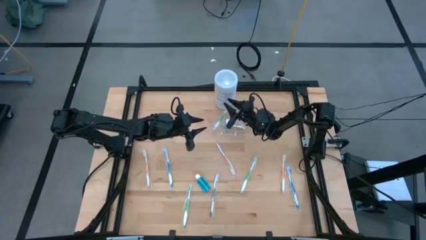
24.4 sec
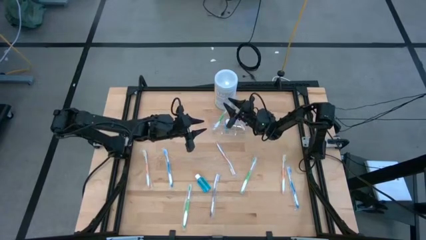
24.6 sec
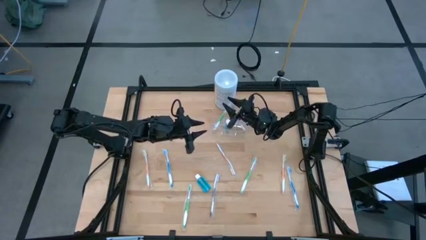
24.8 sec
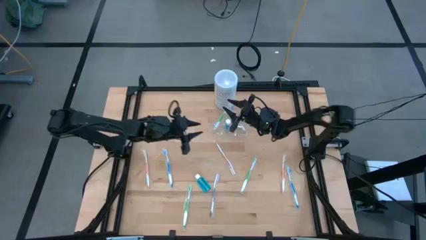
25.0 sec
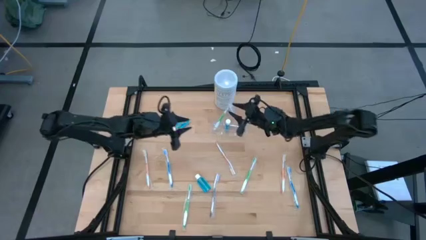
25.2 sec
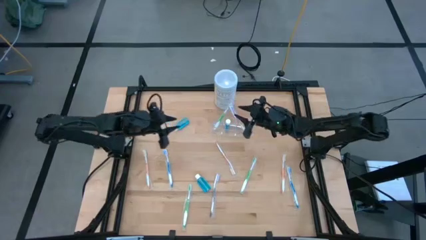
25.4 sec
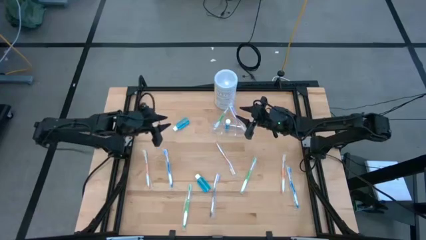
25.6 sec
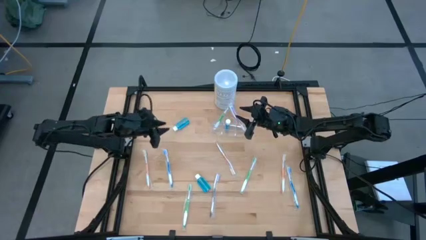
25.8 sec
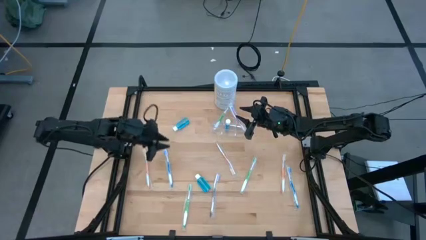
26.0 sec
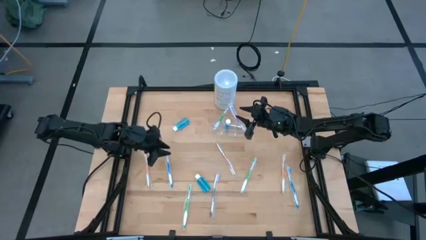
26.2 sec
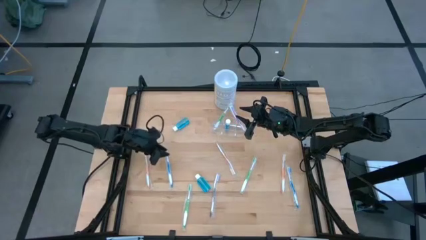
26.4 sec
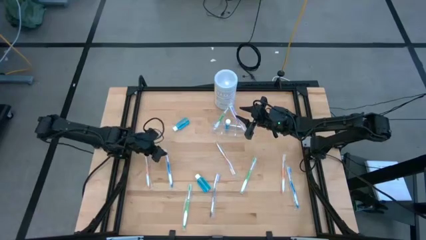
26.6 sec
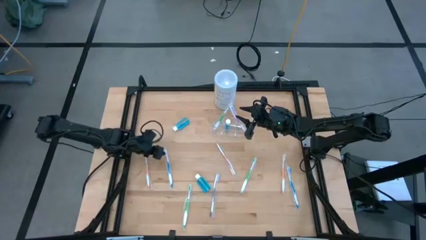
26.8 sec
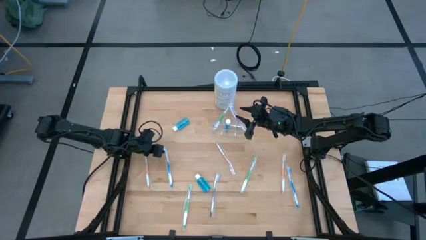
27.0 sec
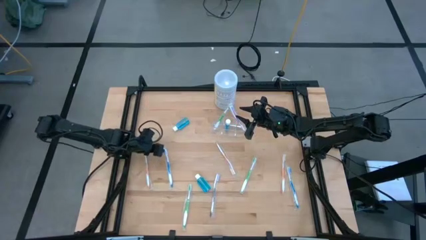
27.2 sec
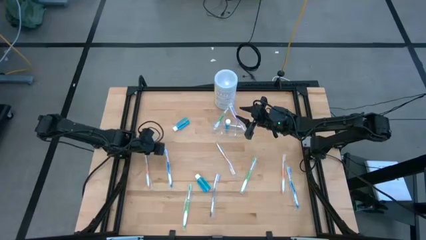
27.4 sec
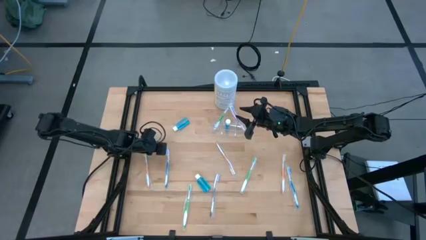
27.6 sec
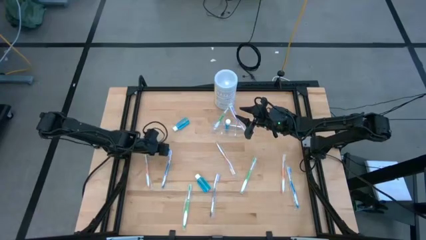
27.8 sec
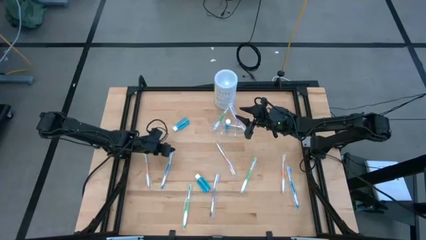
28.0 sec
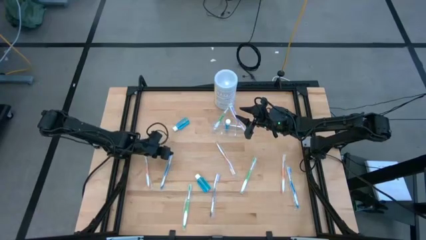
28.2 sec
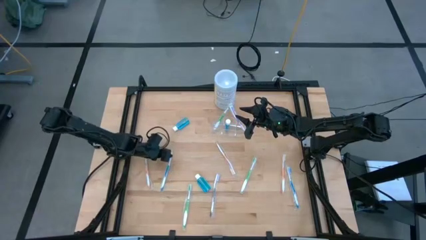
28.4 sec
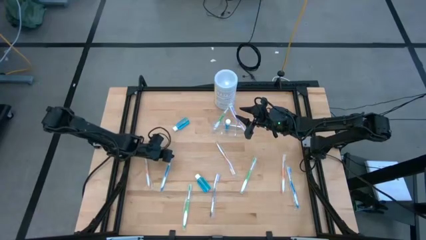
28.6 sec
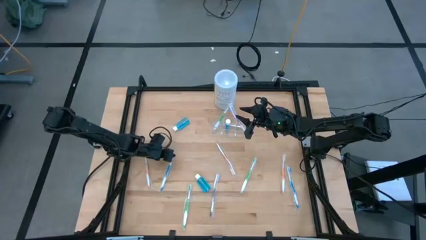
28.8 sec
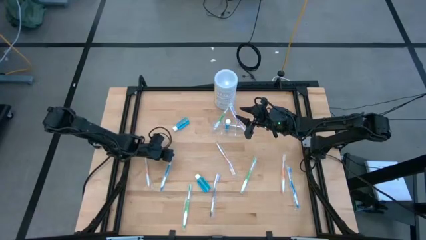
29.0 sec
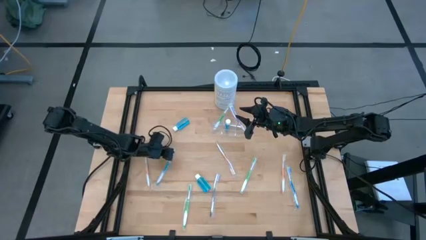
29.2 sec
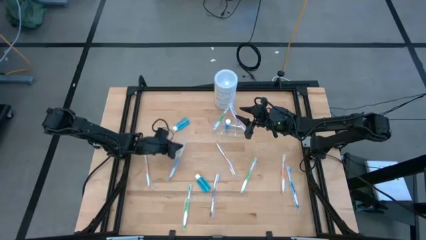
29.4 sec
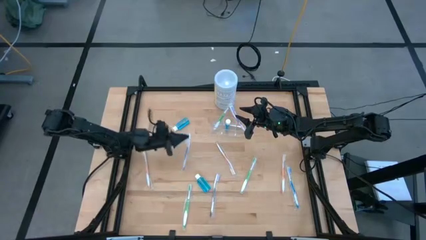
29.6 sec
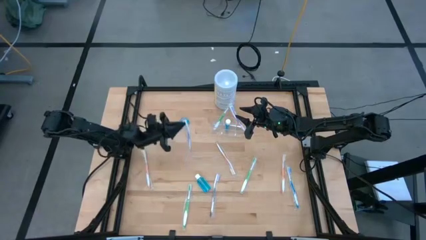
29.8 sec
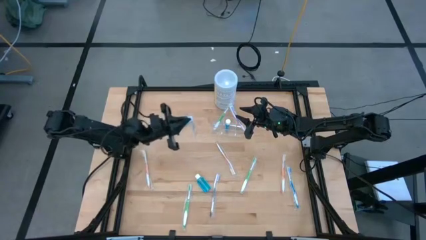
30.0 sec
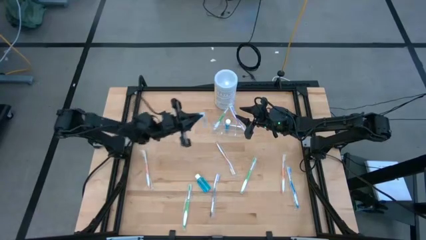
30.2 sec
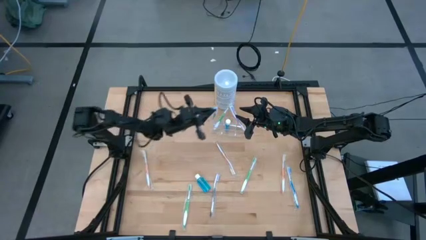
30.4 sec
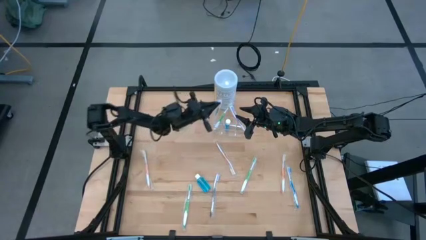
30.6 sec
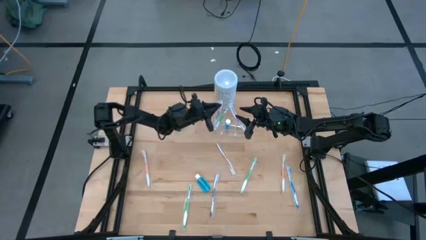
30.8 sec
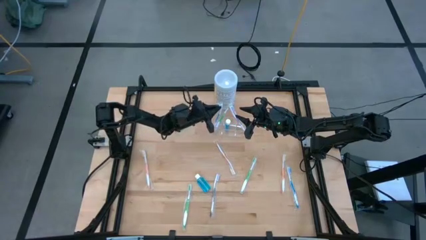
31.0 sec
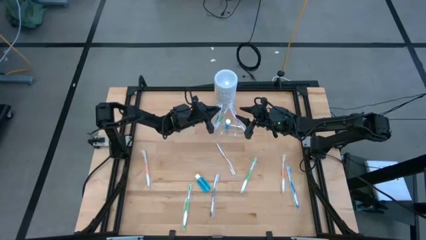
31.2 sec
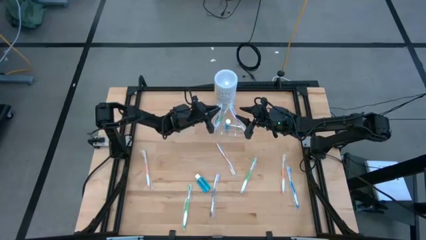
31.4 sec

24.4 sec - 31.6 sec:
Task: Pick & Place toothbrushing station
Put the left blue toothbrush into the transparent organizer

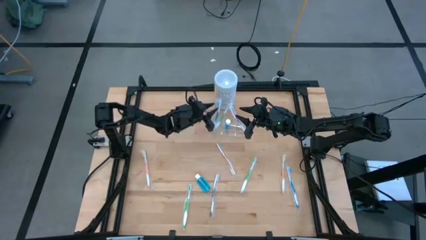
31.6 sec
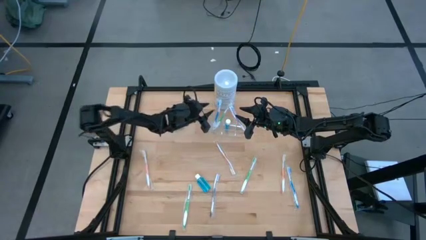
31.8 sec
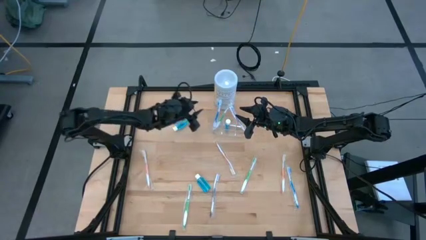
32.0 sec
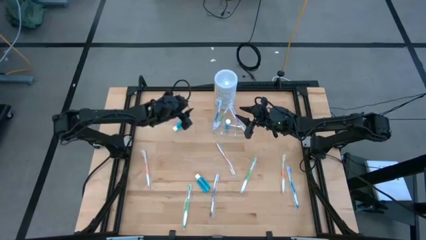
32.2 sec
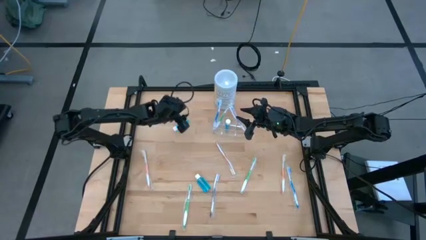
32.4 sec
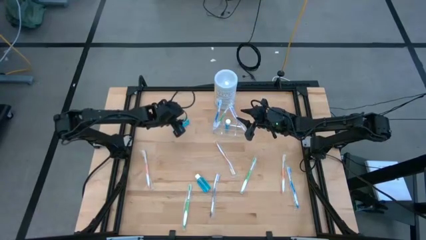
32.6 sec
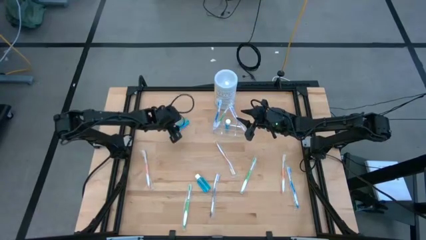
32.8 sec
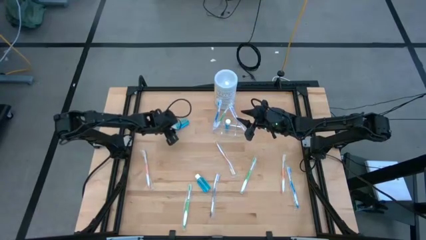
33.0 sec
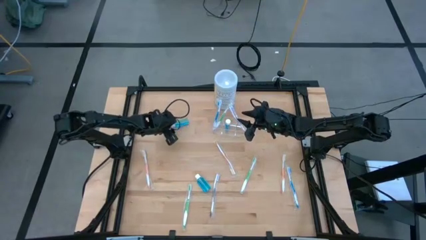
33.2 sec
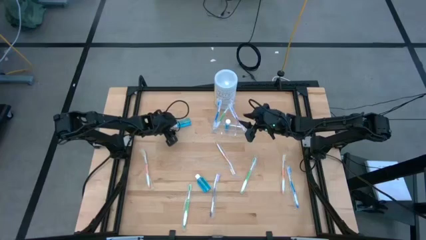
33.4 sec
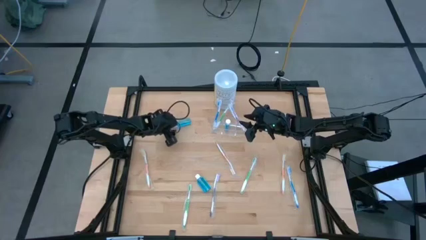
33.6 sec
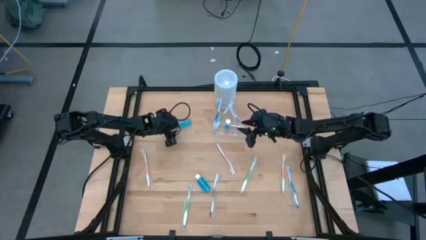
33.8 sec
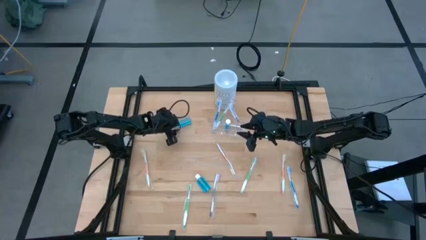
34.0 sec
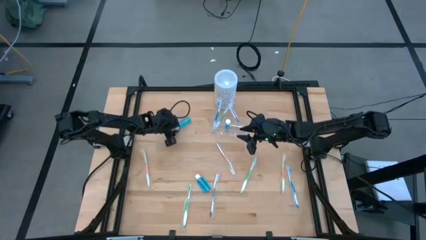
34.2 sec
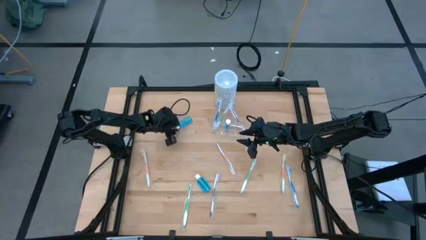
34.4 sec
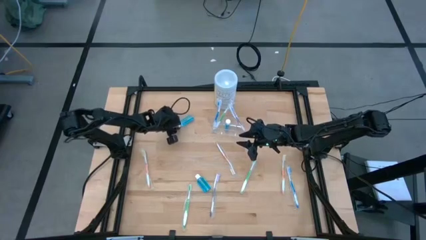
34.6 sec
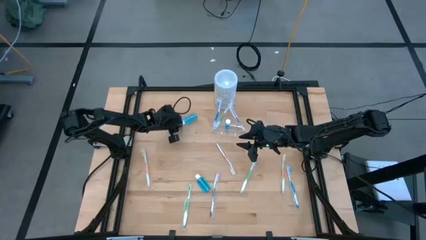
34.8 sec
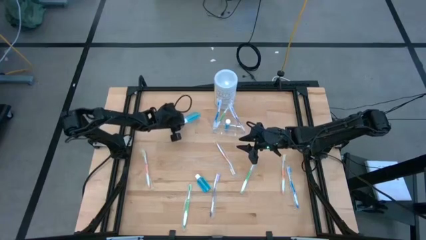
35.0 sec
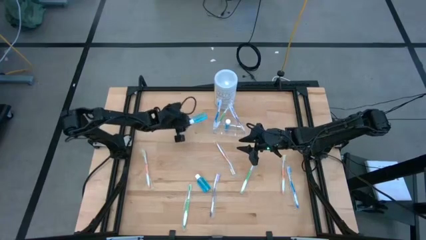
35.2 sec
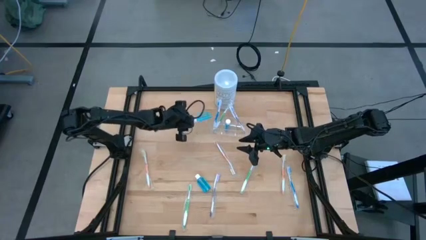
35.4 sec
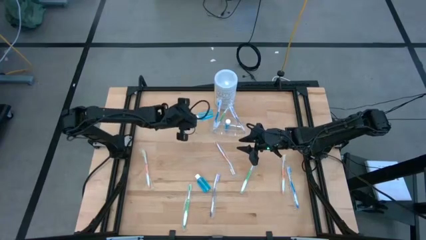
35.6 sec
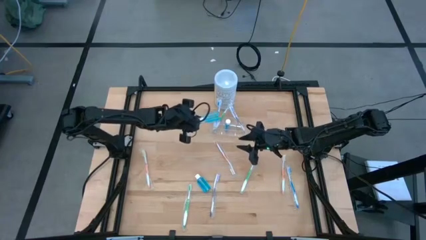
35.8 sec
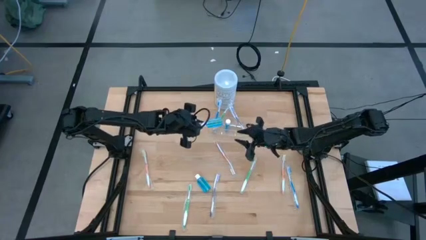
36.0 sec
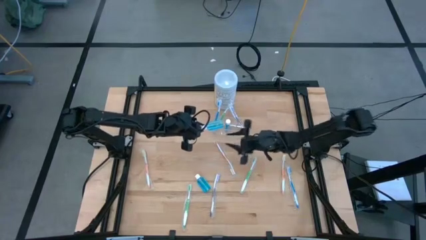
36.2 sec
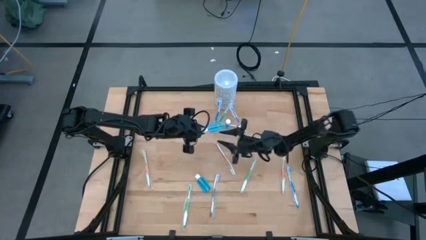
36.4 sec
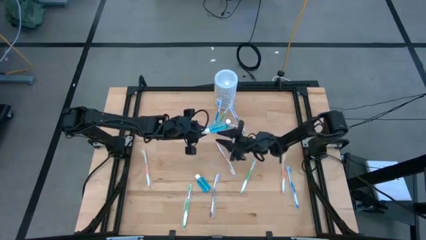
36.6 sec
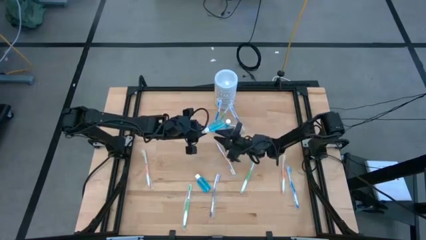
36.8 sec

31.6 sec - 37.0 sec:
Put the top mouthwash into the transparent organizer

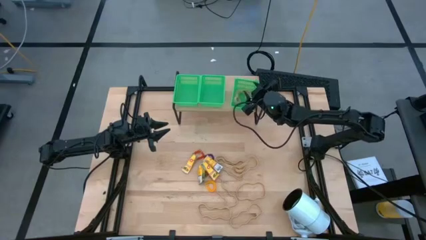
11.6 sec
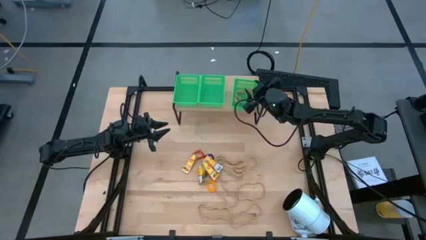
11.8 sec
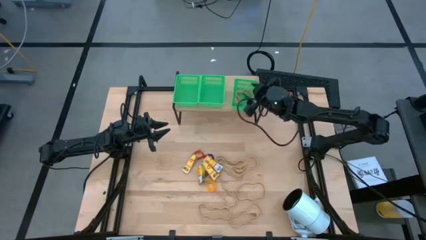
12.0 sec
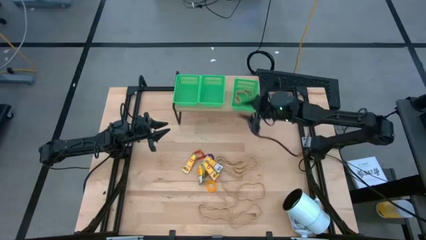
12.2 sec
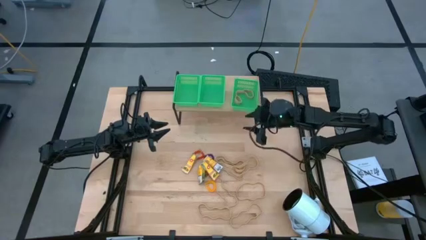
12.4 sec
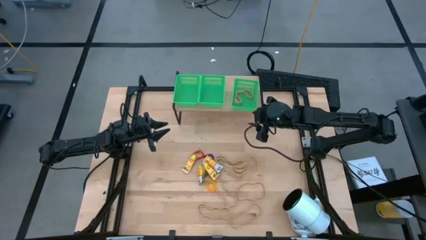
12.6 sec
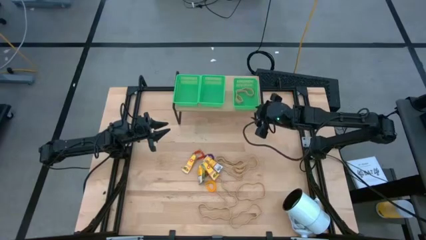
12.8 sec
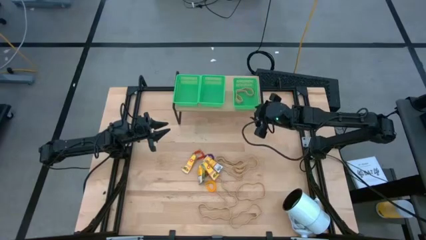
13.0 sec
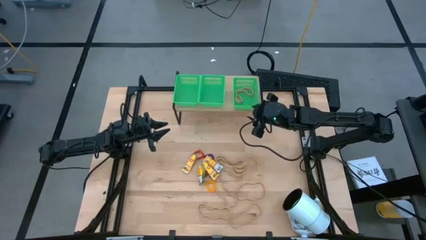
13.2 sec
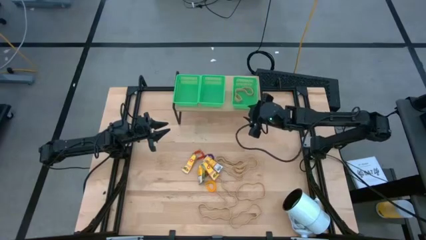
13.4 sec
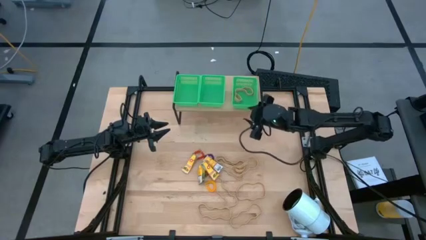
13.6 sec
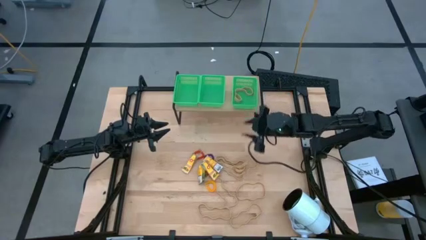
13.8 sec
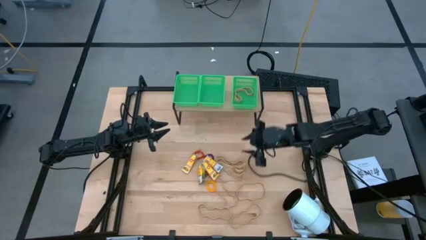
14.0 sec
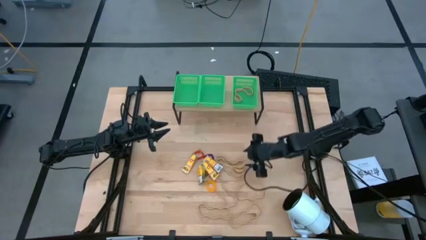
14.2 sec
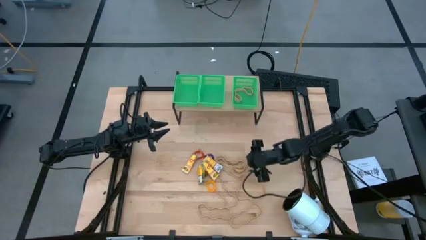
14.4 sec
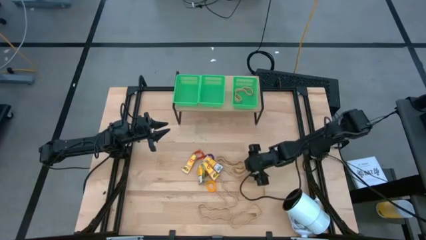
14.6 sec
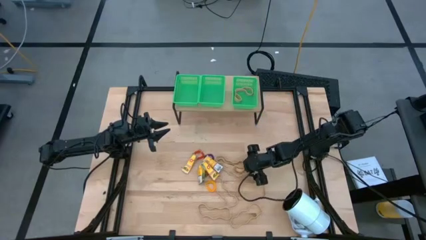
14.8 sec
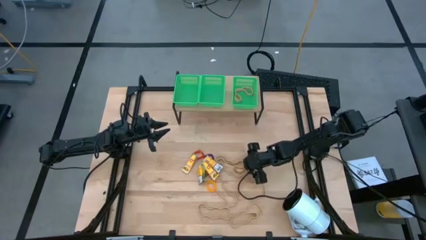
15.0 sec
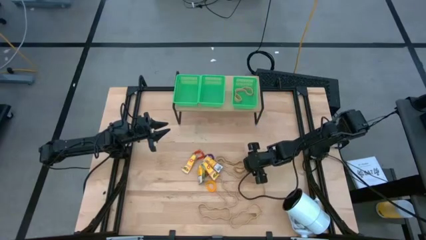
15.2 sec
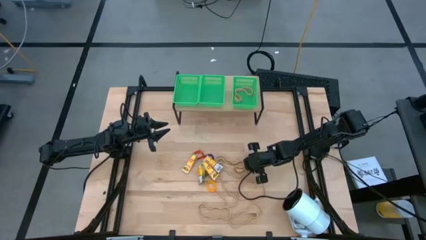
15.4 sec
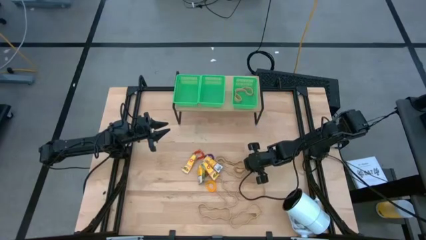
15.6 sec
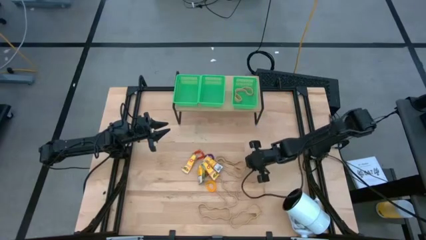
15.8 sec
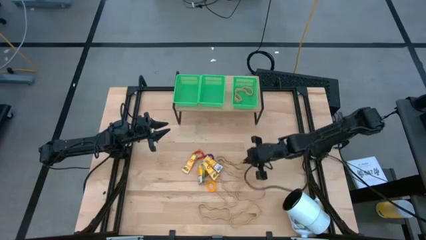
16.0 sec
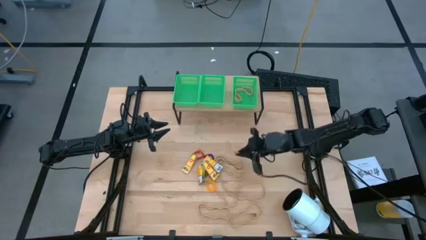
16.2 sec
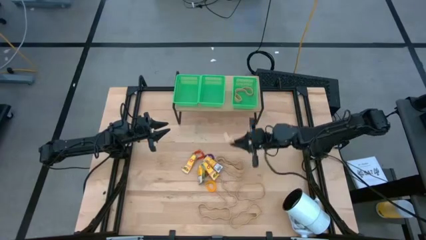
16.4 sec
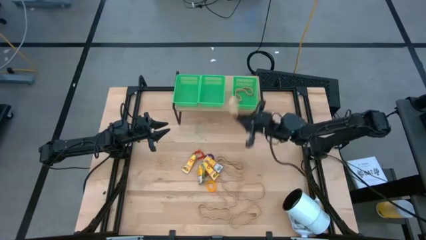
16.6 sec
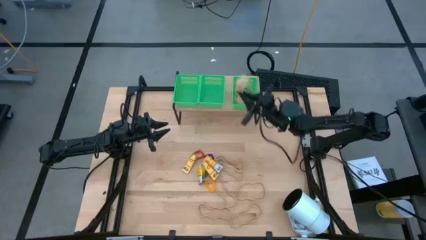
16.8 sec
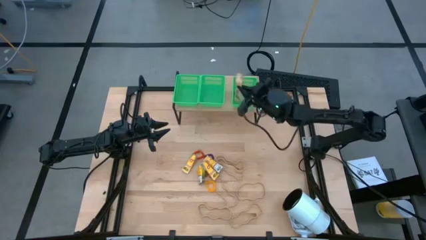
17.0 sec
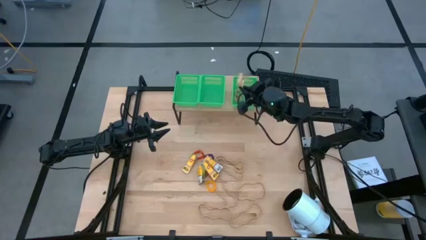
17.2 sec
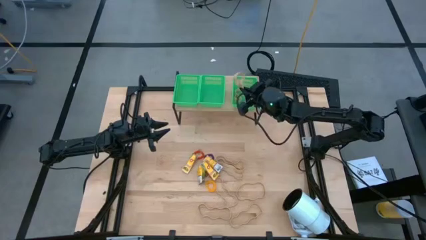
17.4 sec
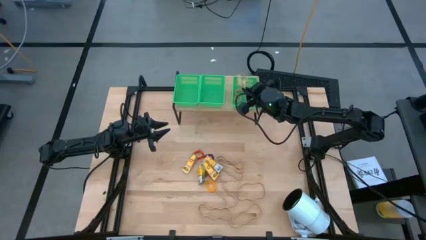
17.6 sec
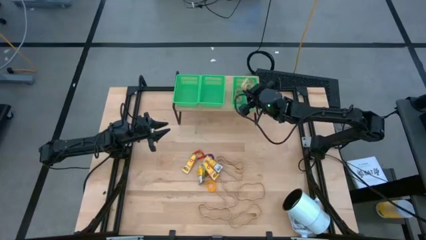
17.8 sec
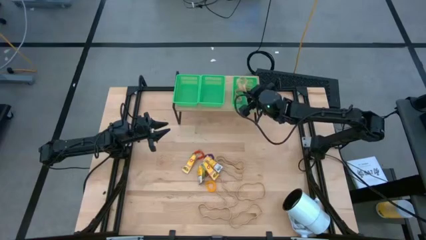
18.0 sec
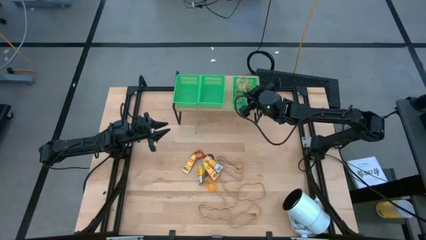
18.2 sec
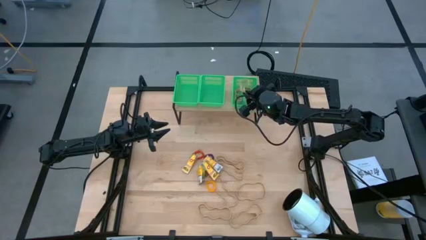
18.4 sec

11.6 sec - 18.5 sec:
Task: Pick & Place Office Desk Supplies
Put the brown rubber band into the right green bin on the shelf
